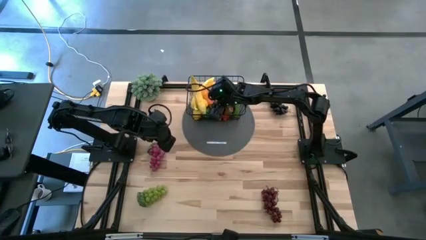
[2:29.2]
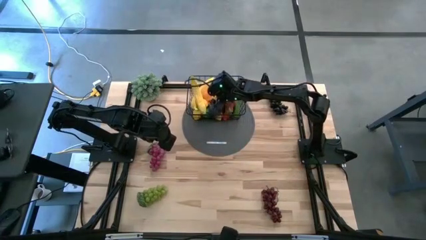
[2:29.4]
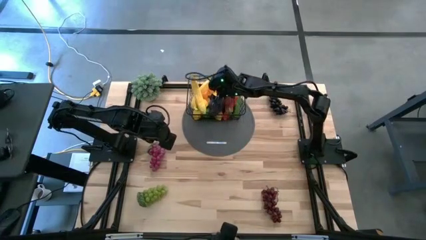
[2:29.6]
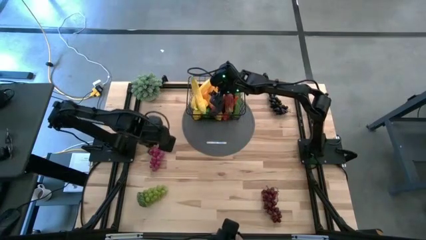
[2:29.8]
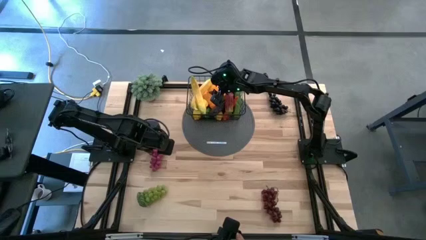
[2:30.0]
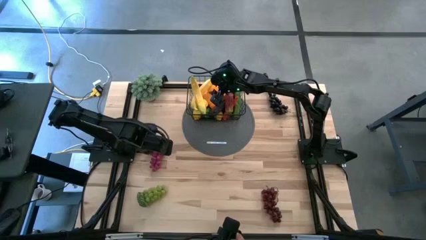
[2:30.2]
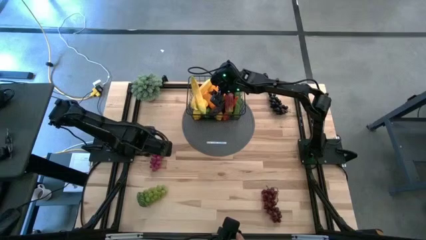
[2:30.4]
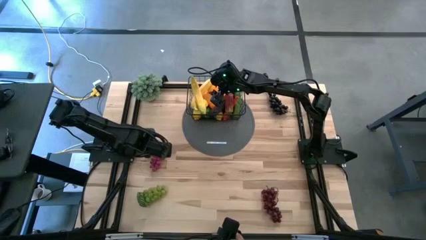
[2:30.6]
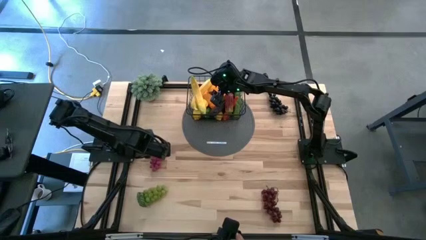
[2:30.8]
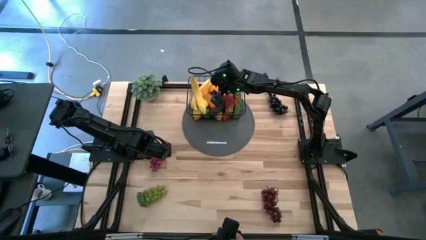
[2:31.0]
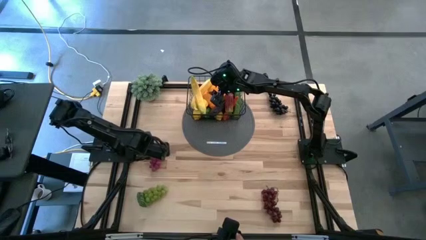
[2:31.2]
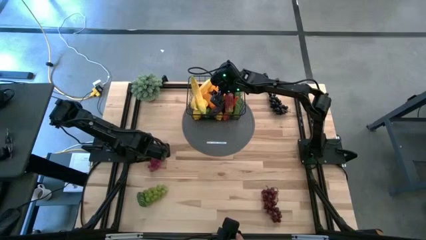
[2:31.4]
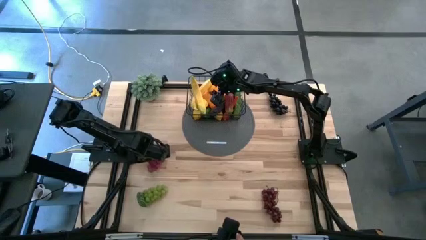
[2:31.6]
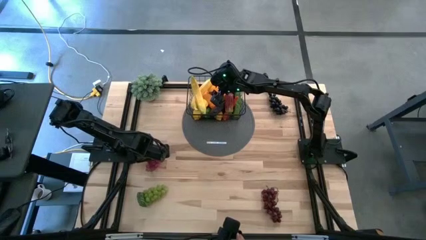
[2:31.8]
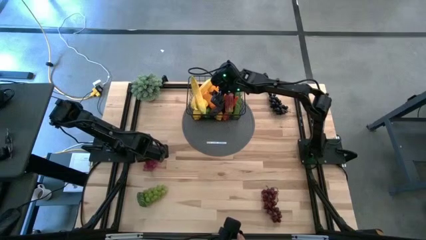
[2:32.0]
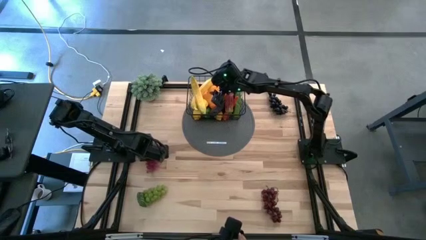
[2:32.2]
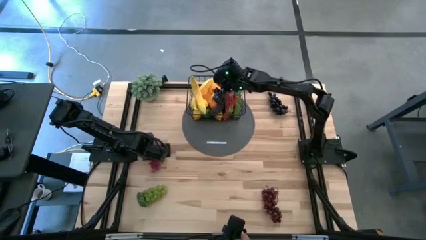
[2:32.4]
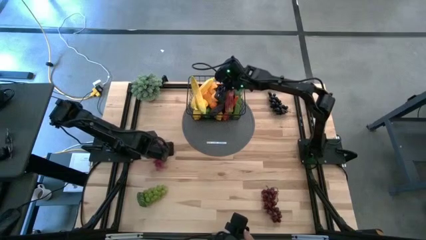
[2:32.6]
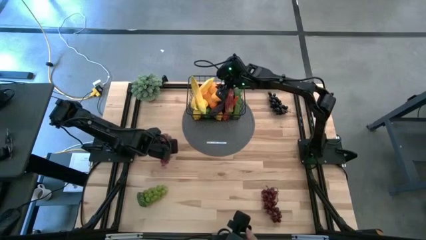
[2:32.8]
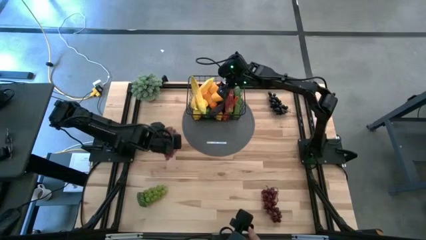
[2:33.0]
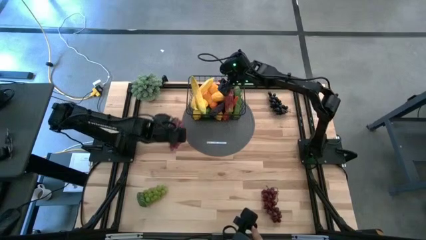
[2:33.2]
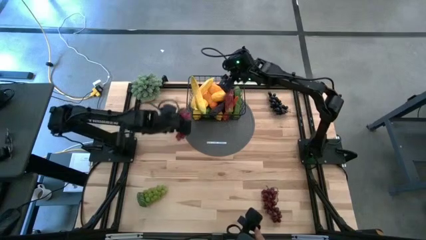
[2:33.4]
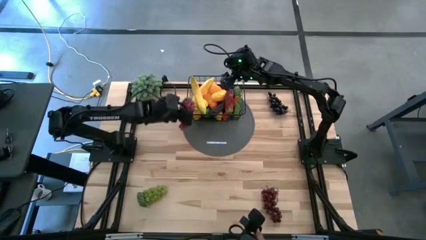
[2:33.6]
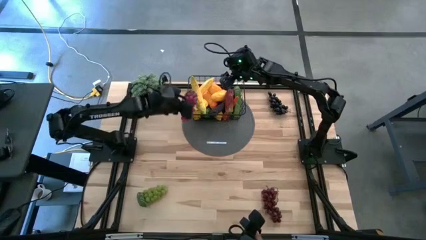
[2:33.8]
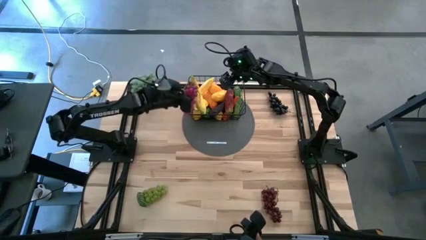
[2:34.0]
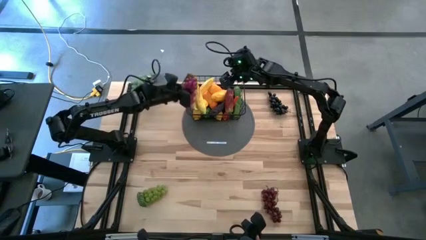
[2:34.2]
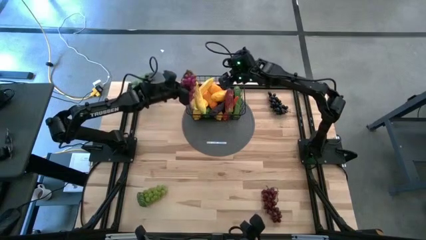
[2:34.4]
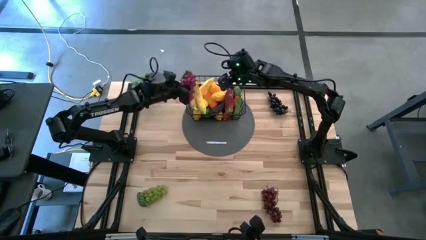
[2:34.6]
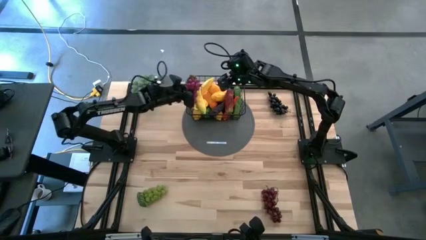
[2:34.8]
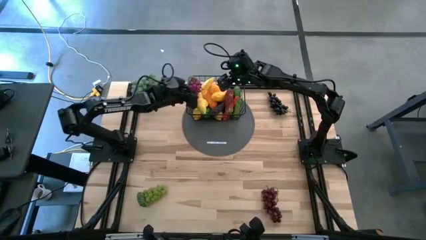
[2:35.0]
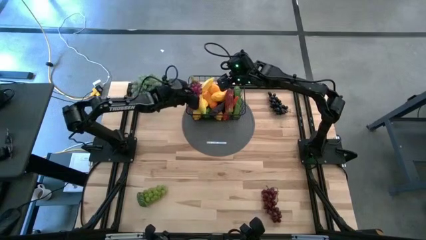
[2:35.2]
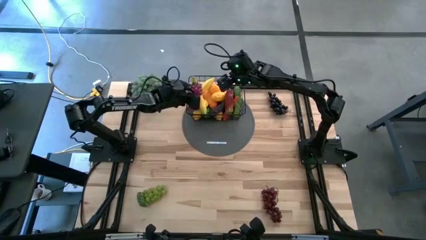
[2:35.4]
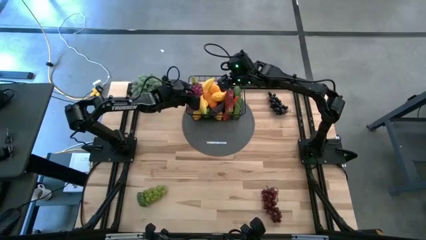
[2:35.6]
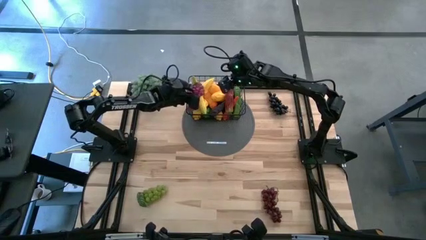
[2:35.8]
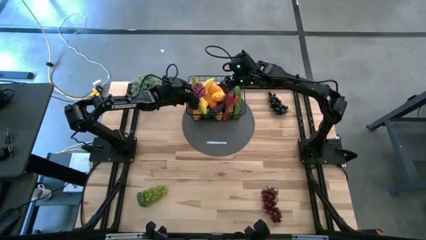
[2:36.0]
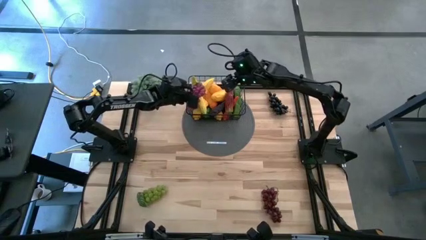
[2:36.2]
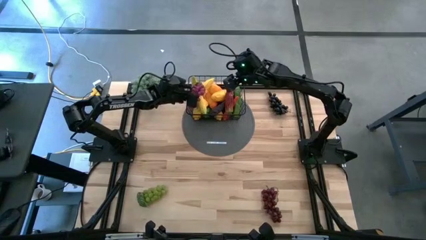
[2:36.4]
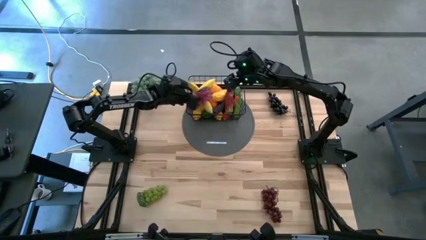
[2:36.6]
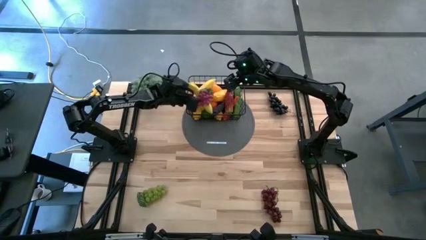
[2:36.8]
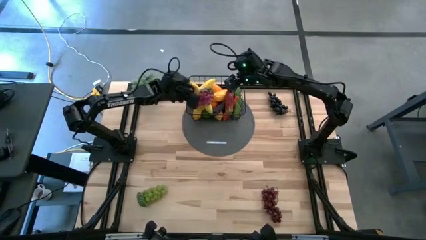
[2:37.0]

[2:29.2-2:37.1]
Task: Build produce basket
Put the pink grapes into the black wire basket

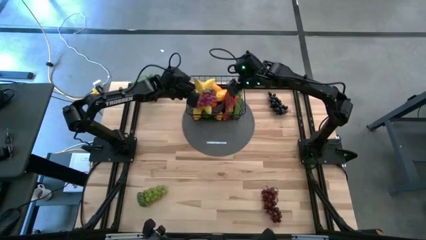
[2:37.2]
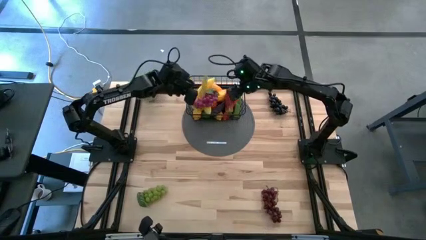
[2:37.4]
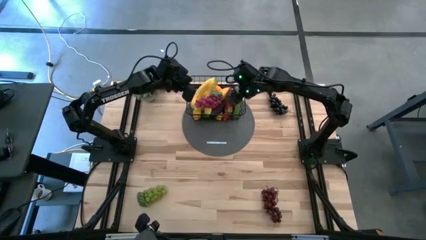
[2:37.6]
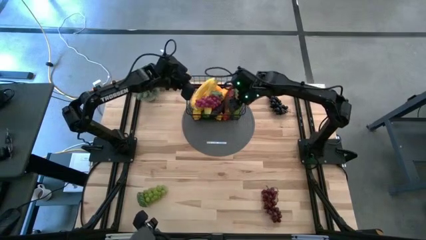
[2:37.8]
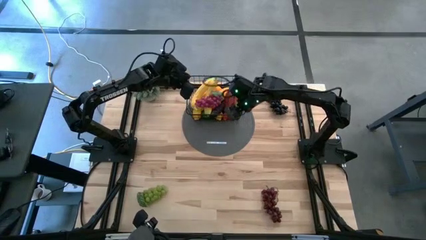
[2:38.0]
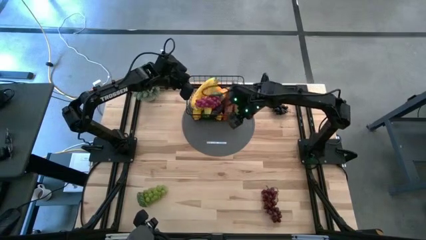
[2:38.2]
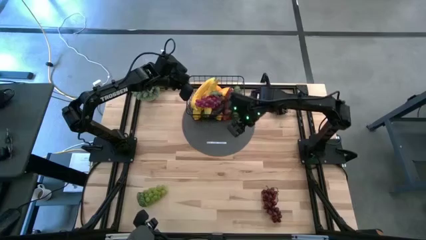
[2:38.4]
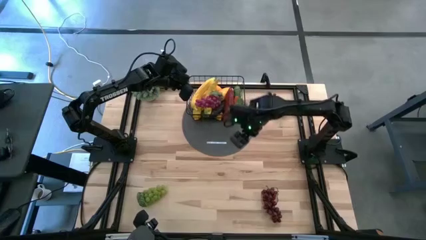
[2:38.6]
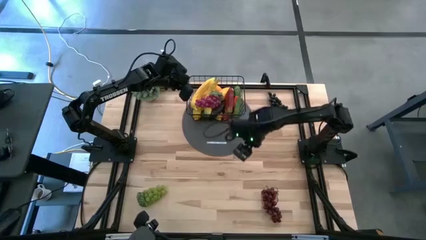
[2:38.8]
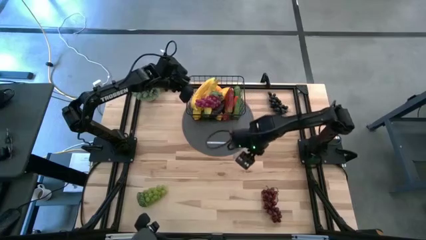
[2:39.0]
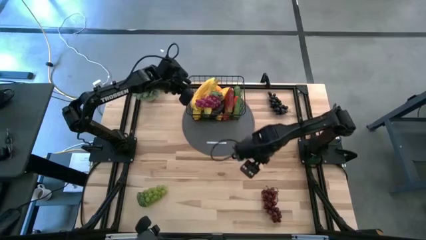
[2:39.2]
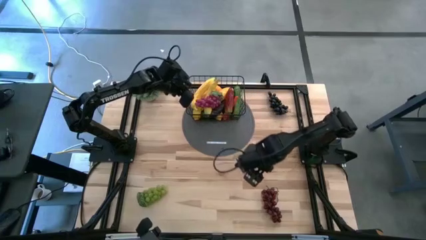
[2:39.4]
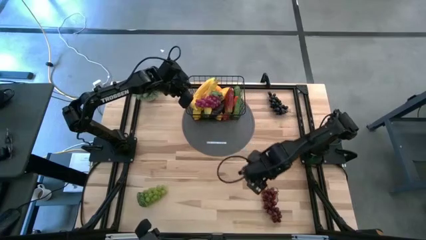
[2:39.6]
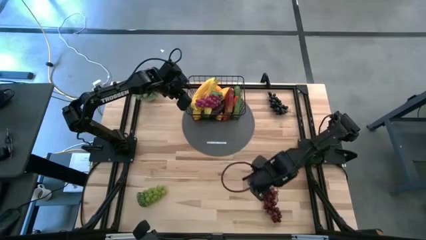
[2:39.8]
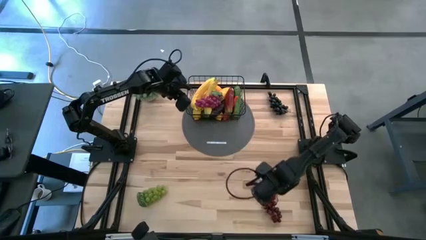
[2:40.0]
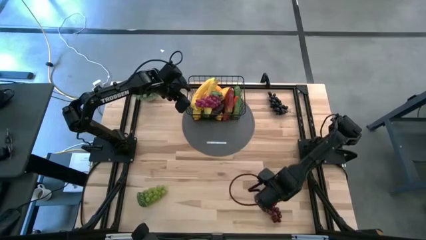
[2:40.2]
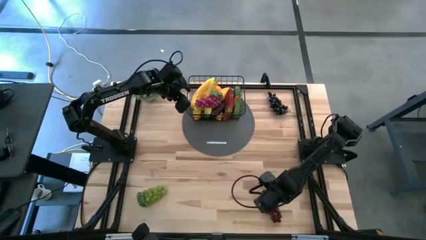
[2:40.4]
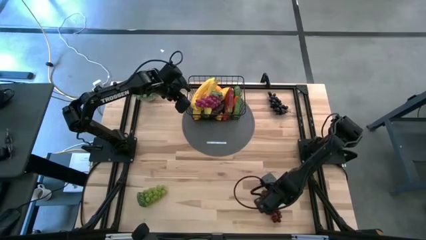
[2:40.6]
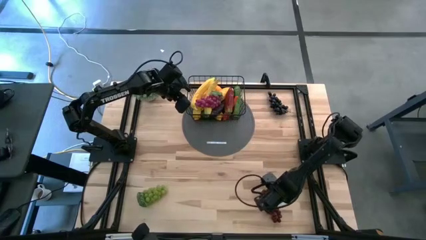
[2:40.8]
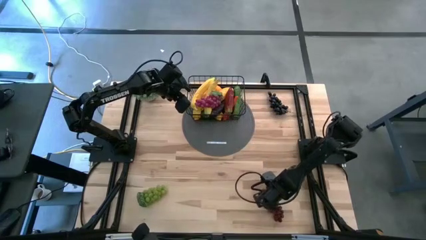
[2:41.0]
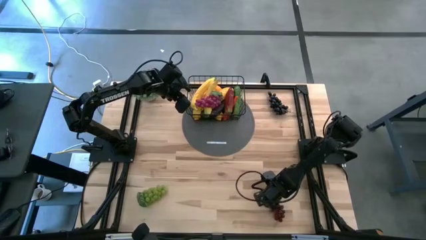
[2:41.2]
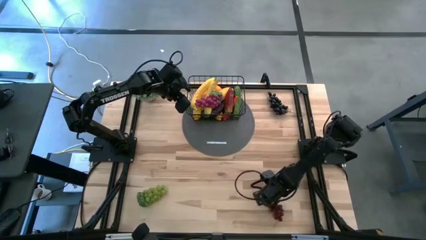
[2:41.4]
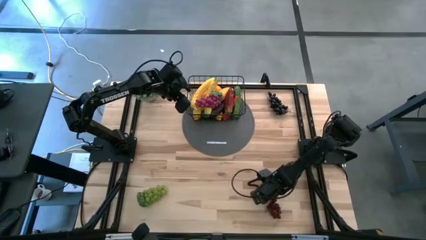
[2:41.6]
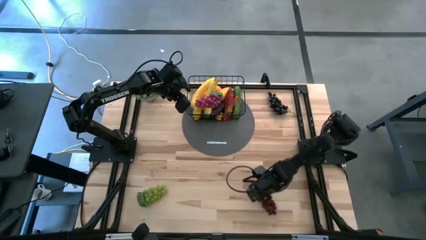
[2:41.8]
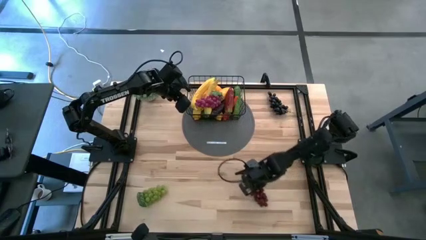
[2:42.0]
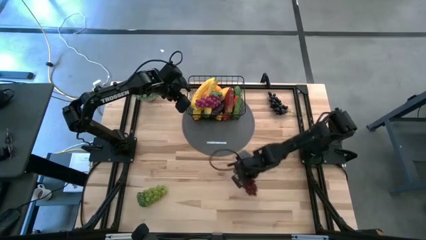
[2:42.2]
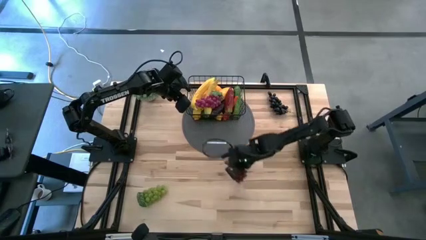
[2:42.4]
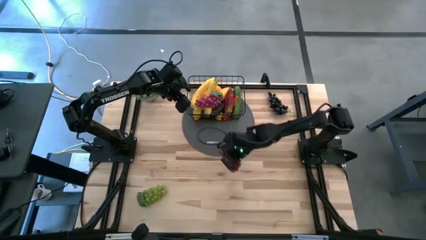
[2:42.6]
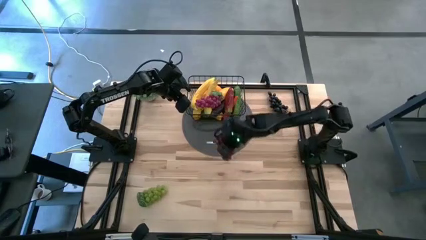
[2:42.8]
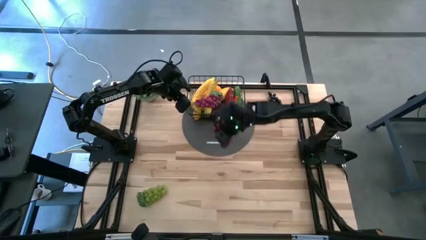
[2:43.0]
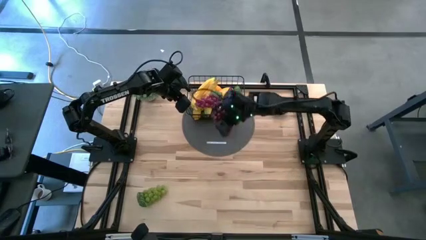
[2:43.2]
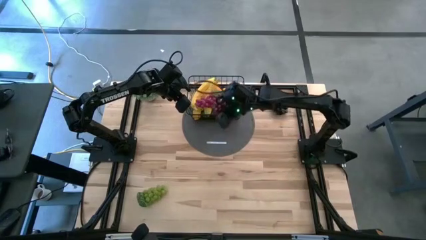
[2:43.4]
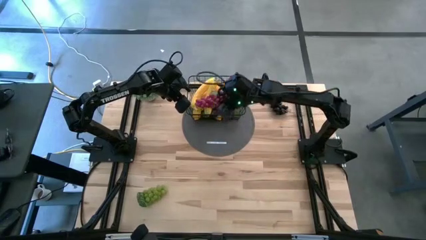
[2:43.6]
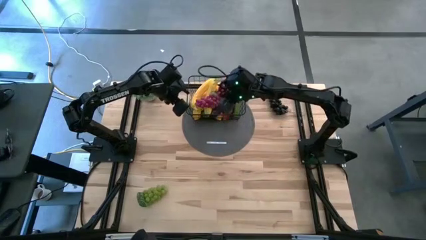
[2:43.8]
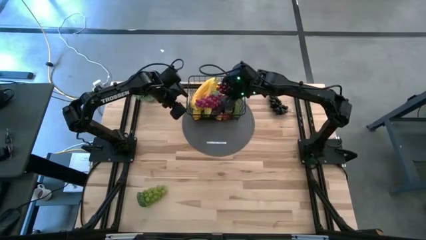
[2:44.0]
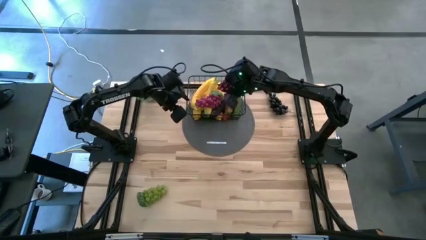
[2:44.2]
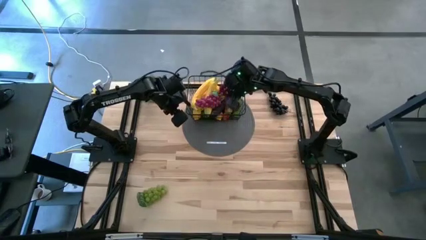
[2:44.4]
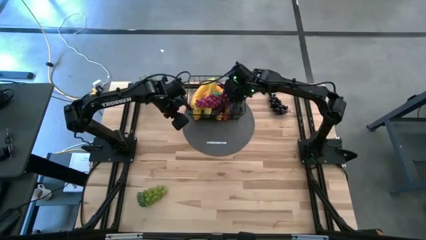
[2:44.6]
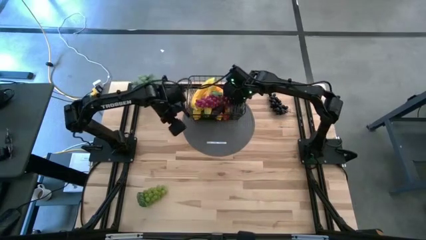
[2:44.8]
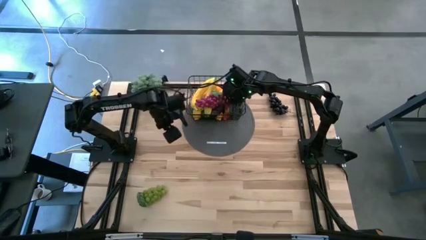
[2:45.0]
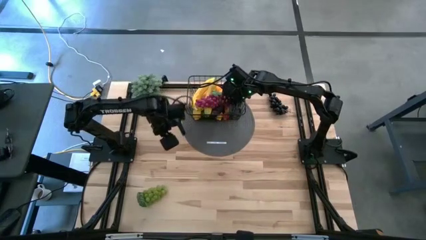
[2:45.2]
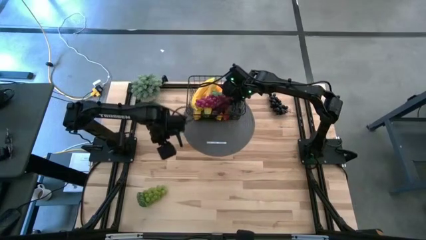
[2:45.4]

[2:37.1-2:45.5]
Put the red grapes into the black wire basket
